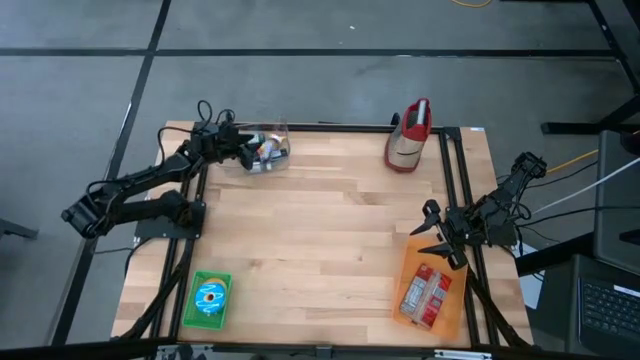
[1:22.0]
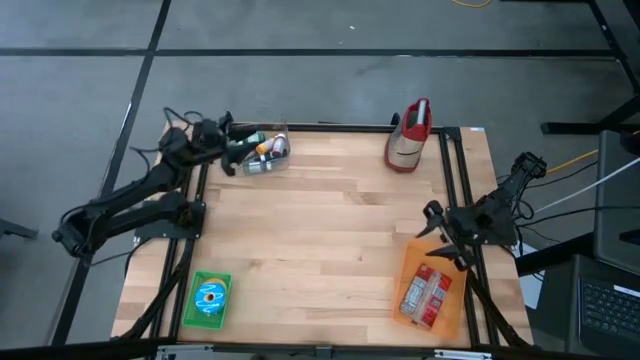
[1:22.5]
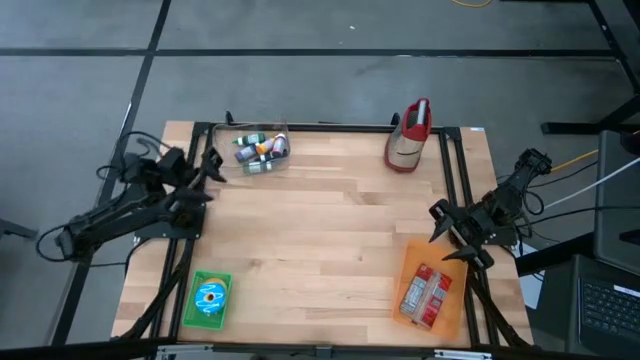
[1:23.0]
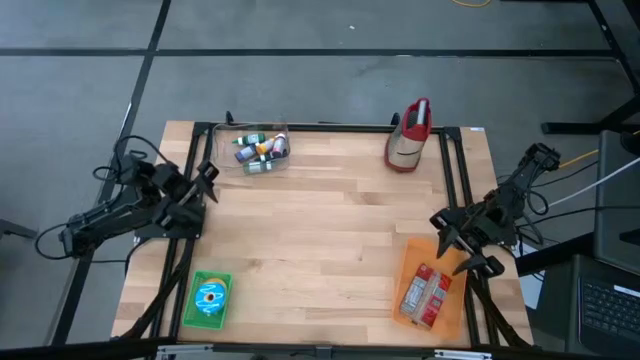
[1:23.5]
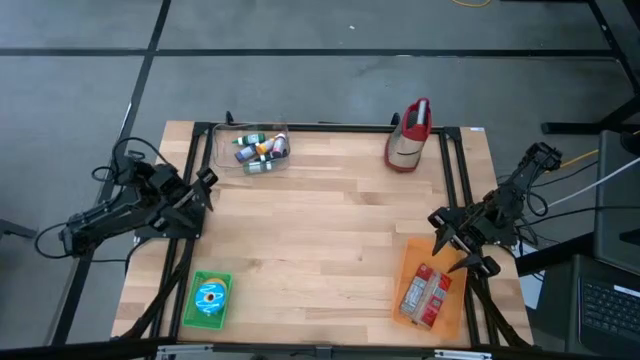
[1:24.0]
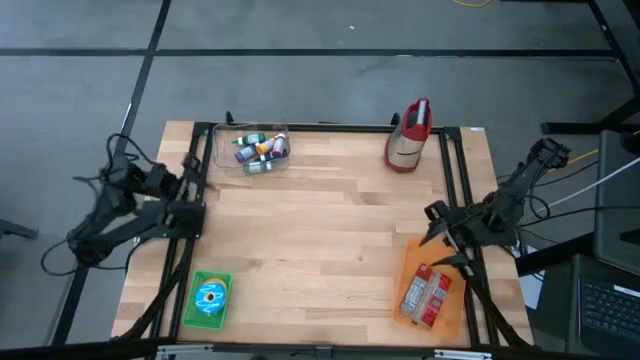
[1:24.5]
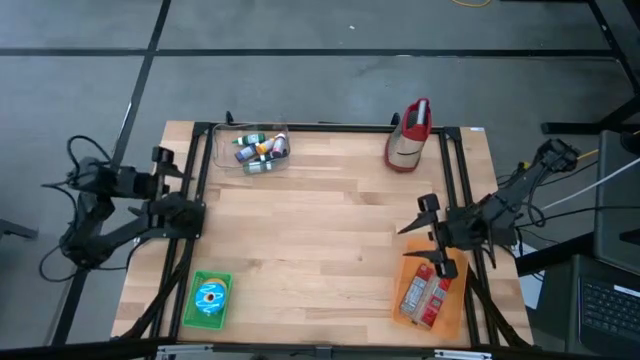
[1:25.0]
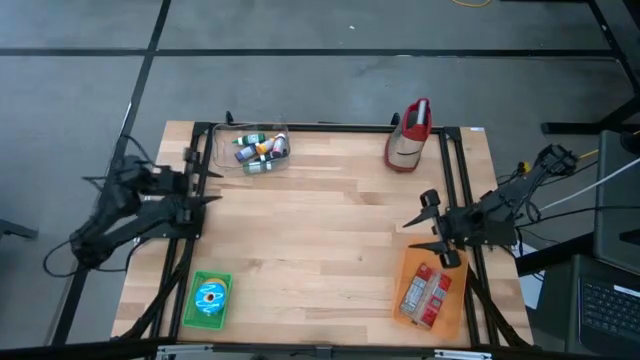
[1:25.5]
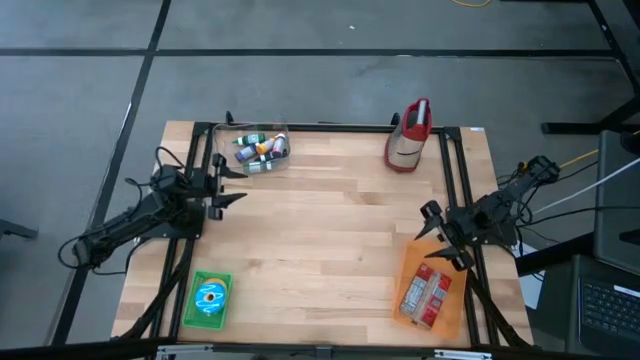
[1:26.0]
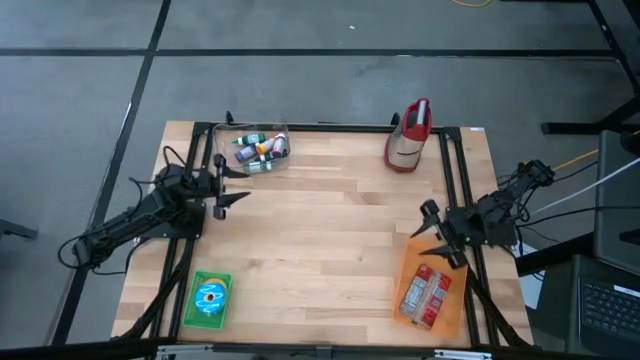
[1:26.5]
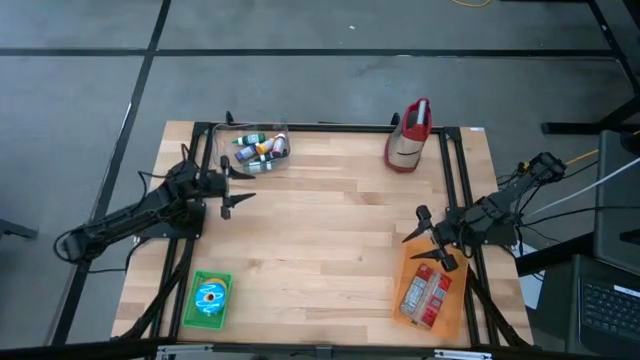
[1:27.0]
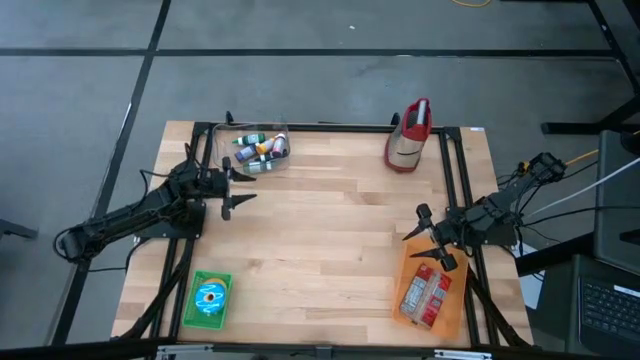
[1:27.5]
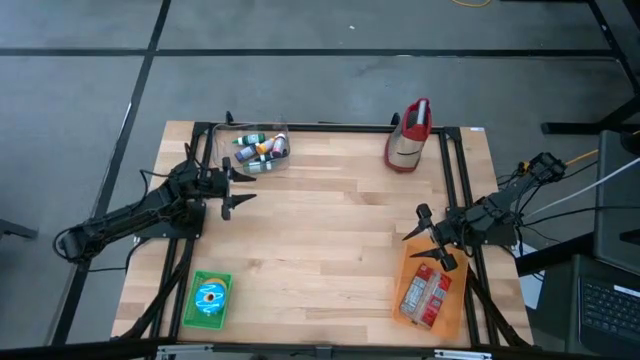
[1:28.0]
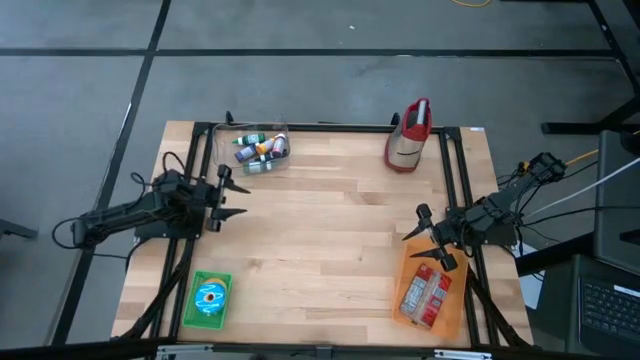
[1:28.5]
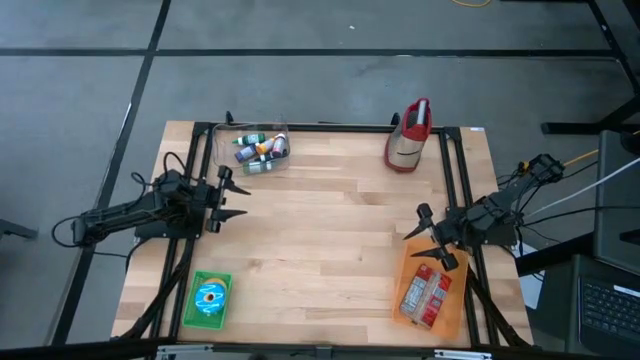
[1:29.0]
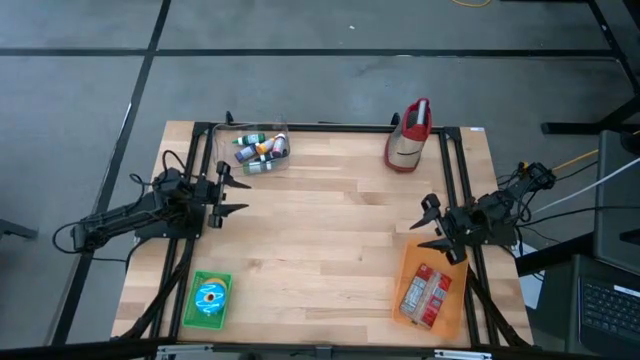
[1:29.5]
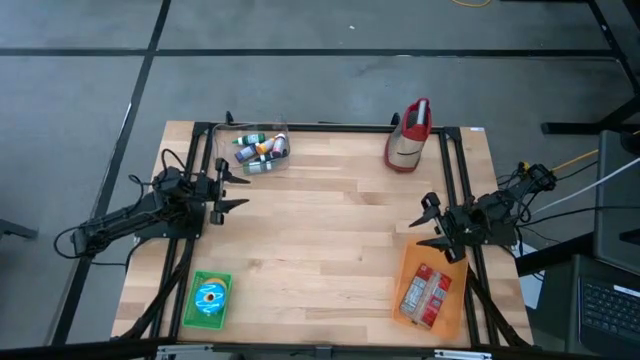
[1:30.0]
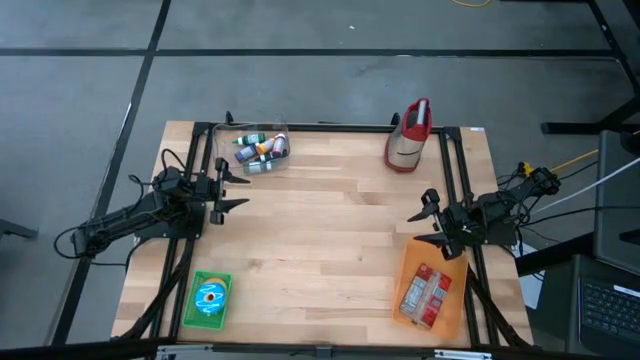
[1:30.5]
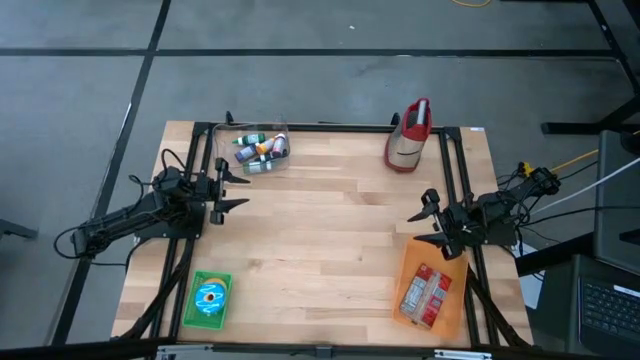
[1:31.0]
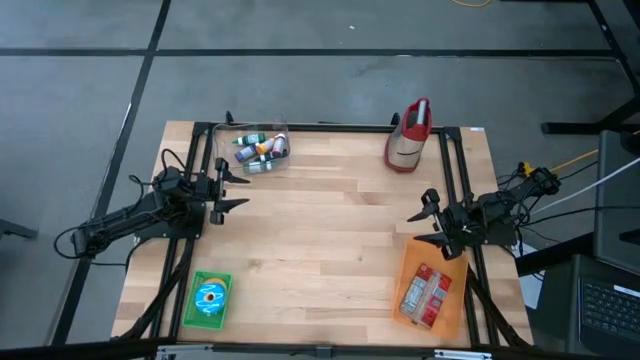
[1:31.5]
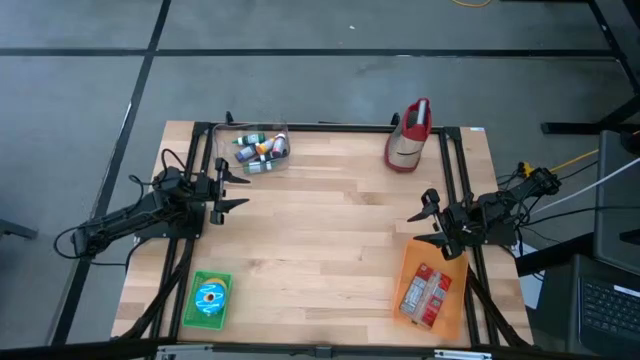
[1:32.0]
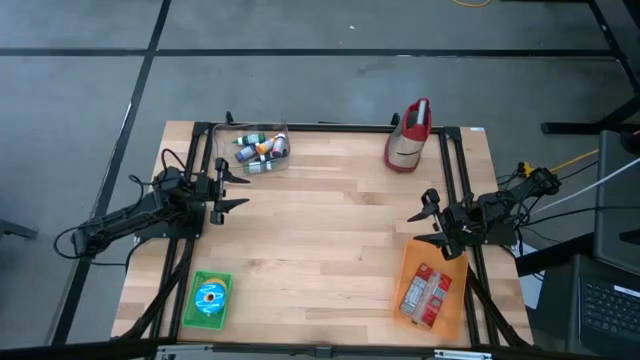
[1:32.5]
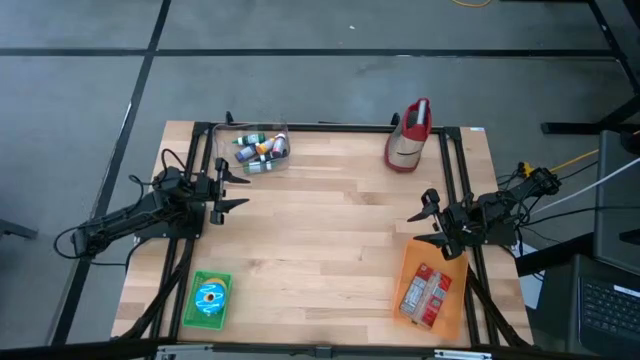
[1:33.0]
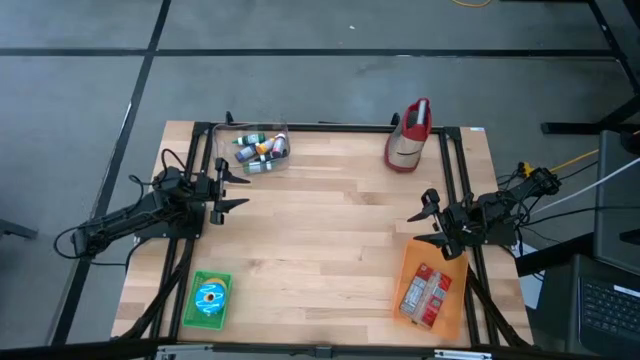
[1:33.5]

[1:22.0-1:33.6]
Return to Home Position

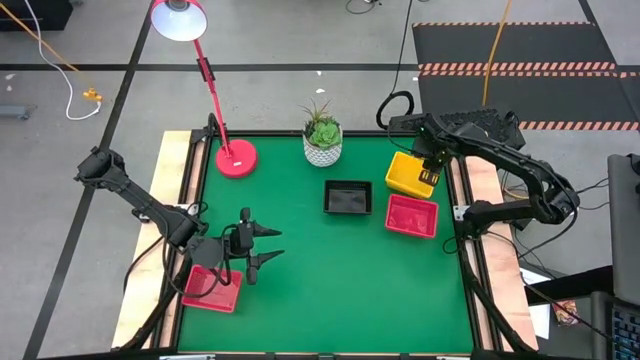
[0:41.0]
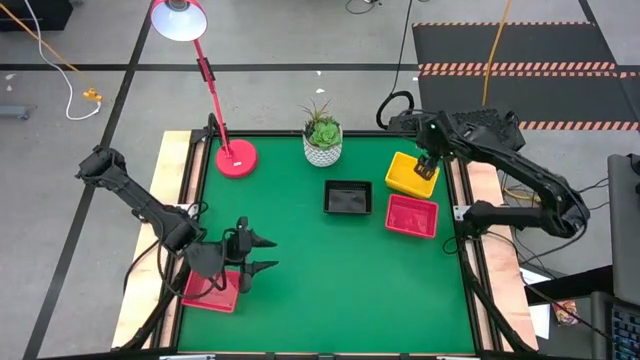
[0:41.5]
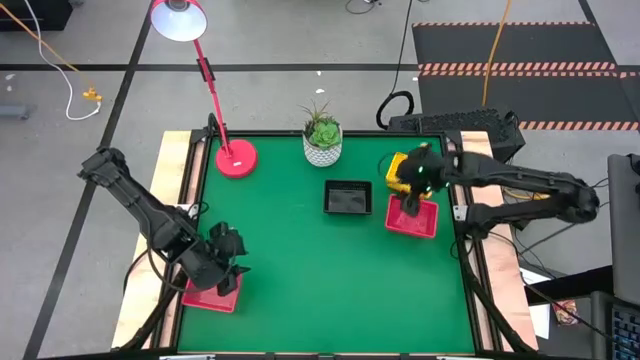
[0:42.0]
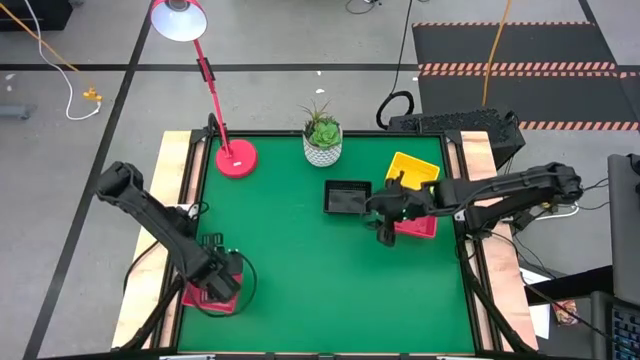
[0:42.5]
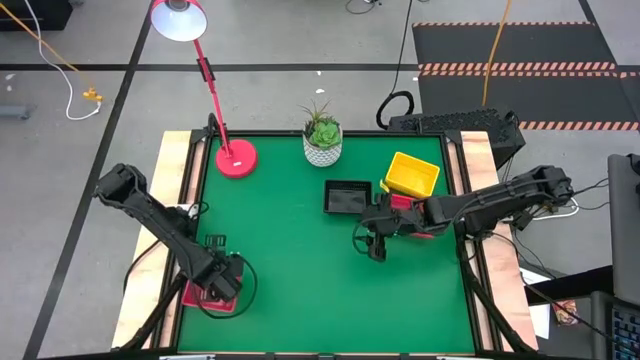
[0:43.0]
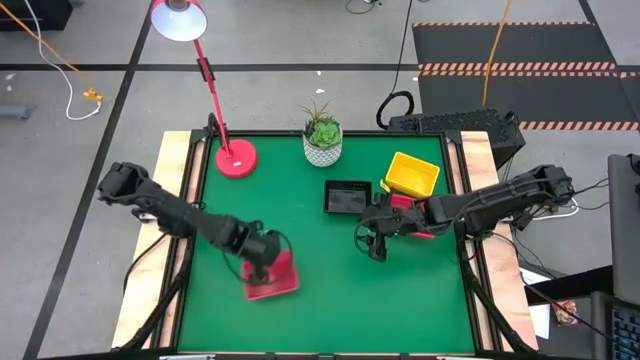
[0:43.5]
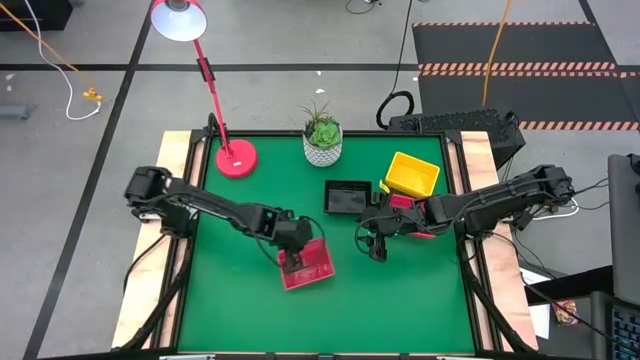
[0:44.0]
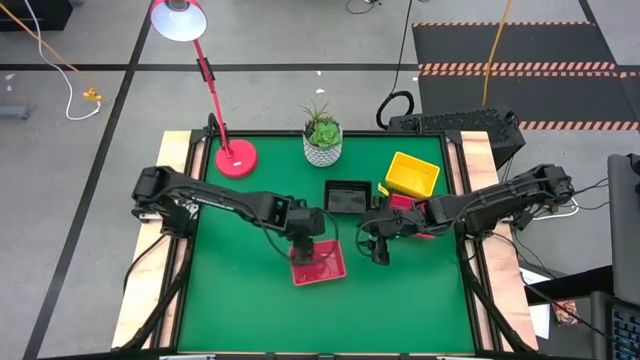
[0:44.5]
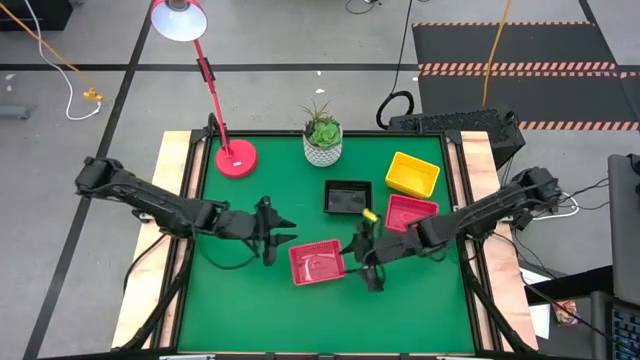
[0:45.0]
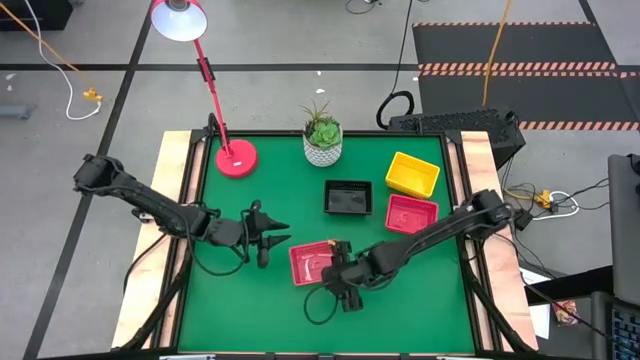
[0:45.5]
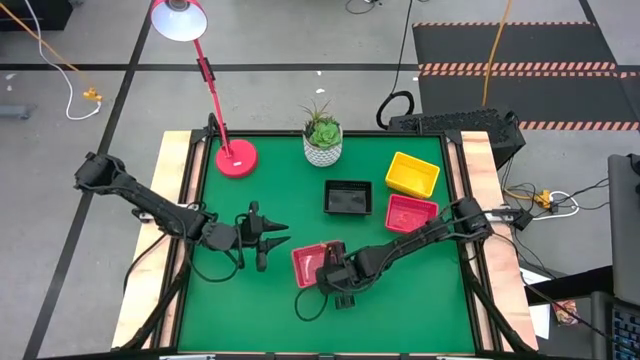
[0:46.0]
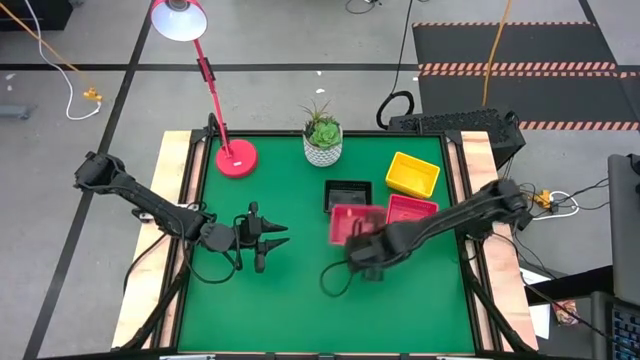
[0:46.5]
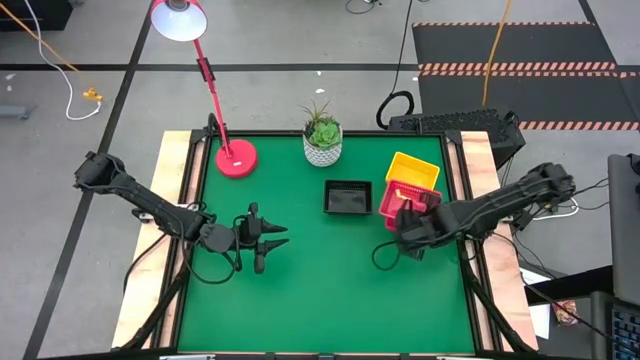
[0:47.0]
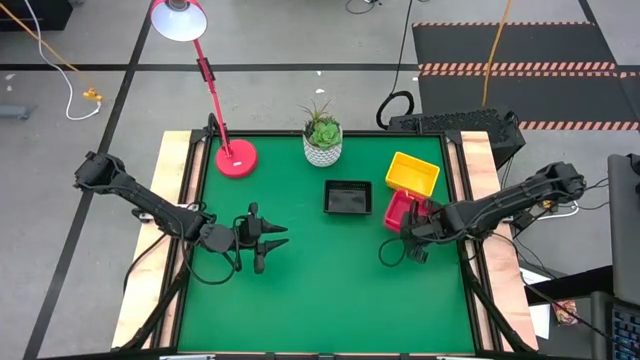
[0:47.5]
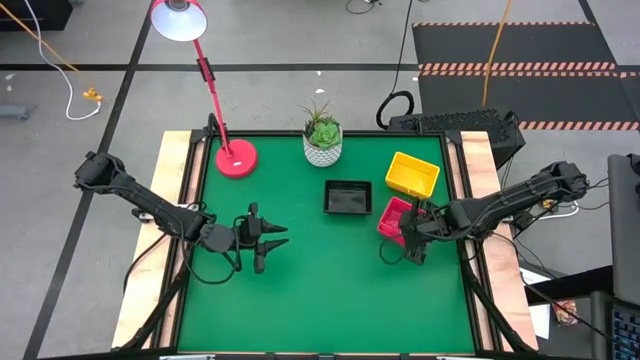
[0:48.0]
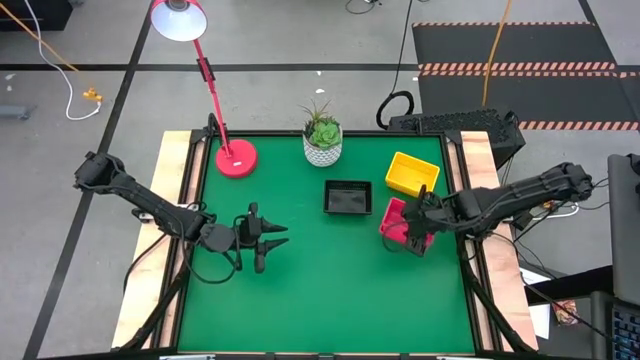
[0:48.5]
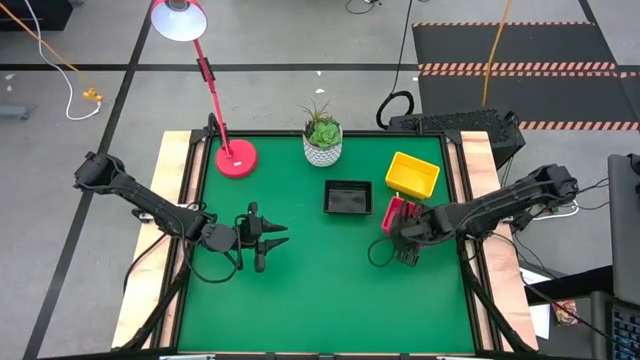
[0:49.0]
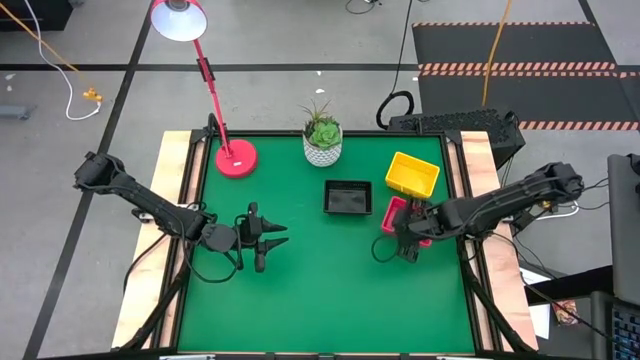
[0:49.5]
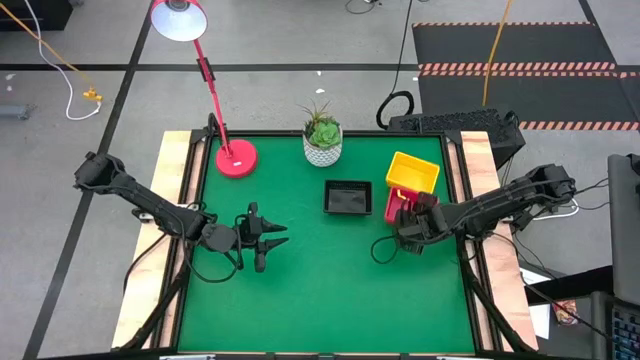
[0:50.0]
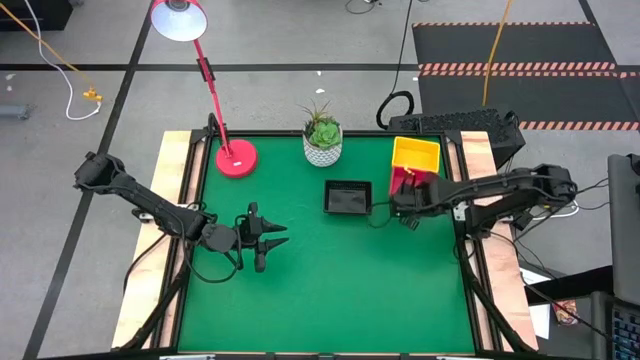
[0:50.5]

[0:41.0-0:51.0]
Stack the red bin on top of the stacked red bins
